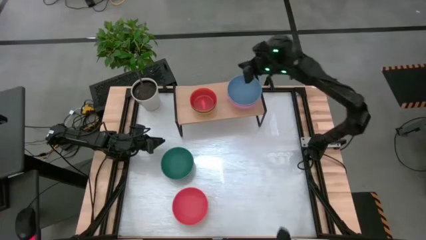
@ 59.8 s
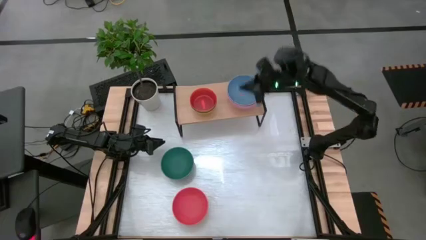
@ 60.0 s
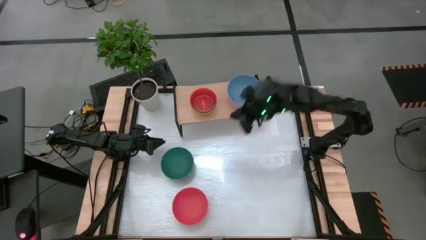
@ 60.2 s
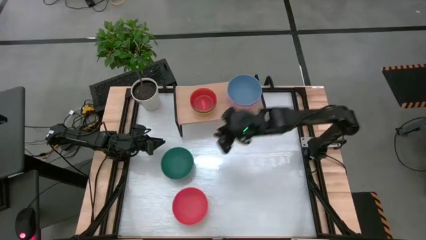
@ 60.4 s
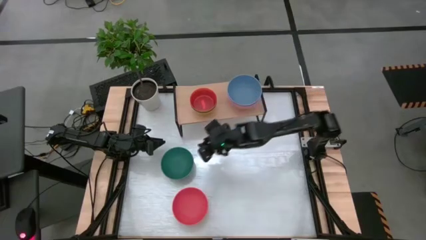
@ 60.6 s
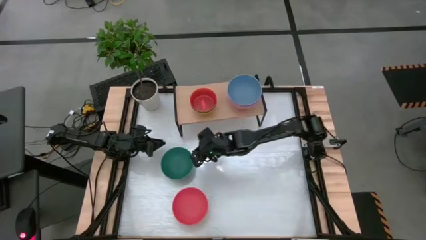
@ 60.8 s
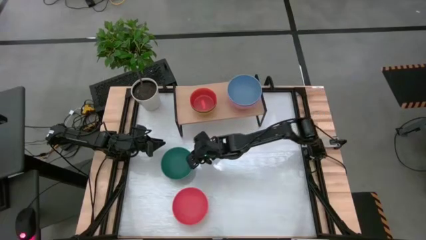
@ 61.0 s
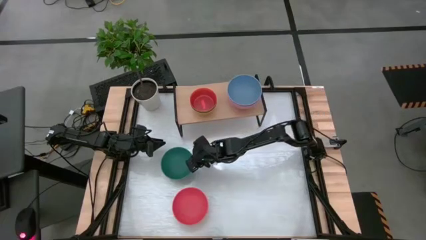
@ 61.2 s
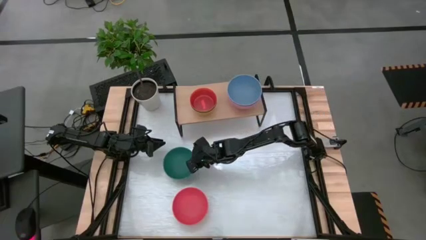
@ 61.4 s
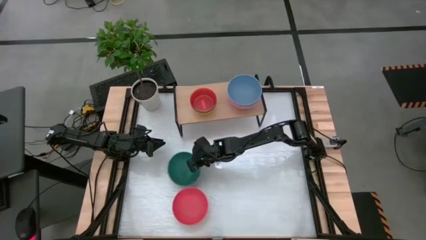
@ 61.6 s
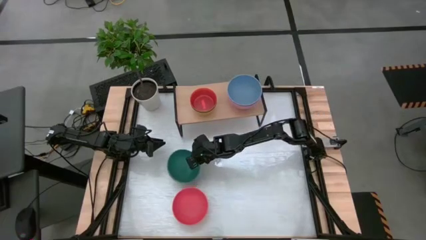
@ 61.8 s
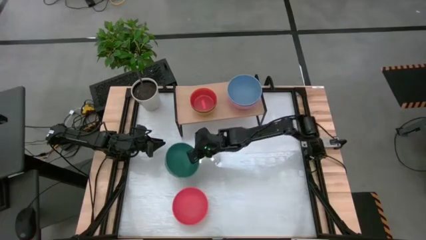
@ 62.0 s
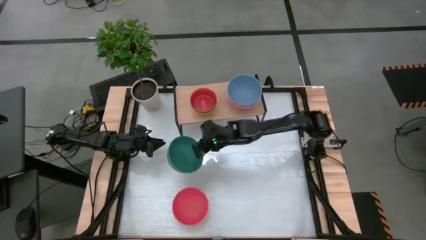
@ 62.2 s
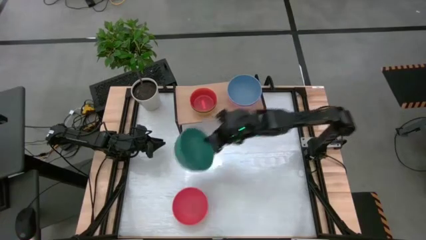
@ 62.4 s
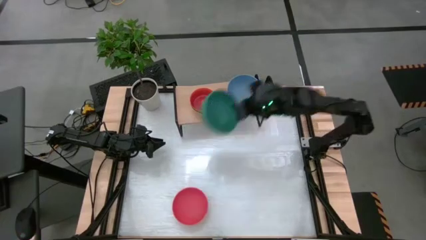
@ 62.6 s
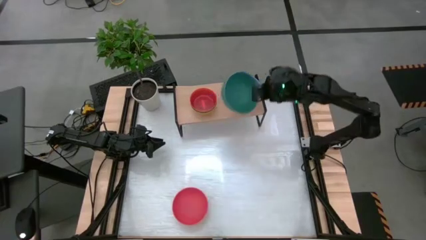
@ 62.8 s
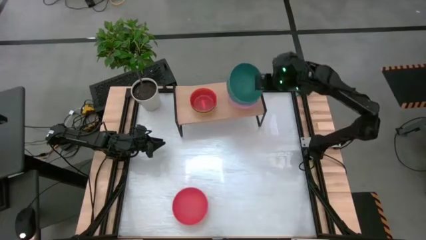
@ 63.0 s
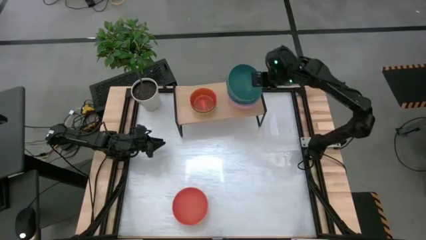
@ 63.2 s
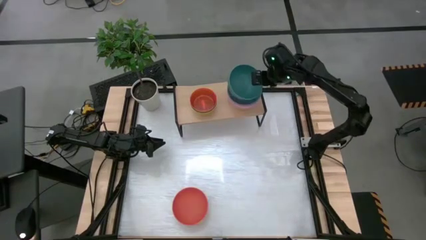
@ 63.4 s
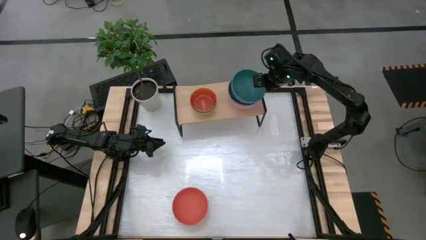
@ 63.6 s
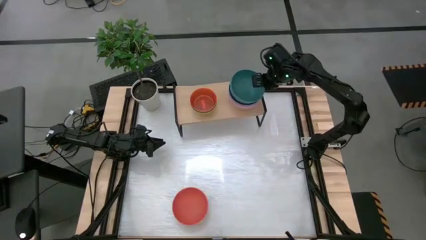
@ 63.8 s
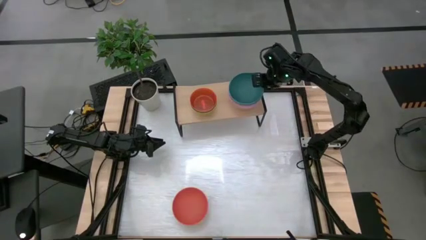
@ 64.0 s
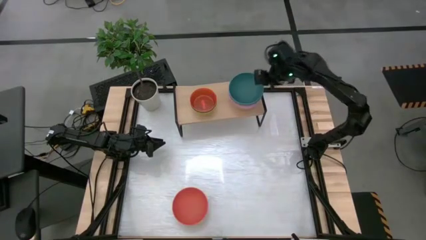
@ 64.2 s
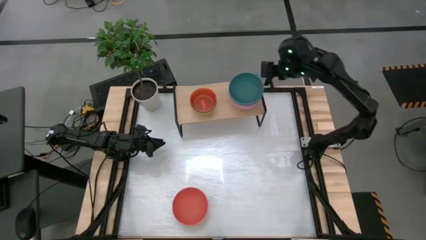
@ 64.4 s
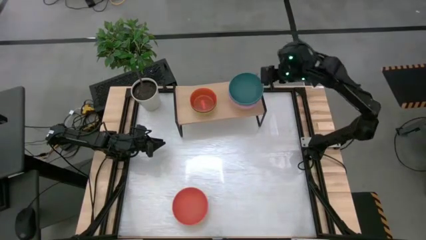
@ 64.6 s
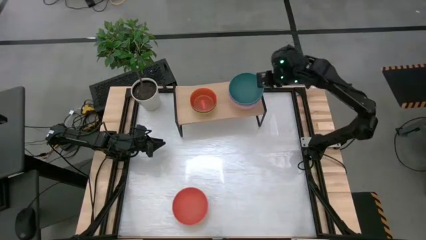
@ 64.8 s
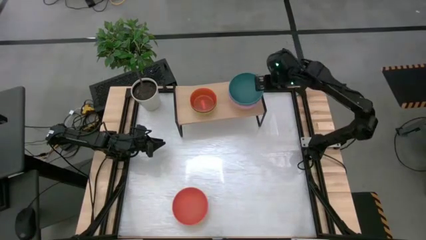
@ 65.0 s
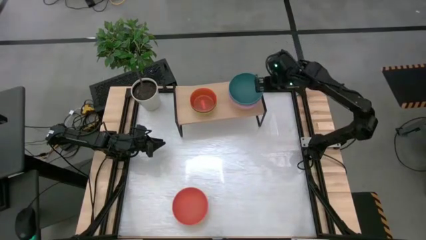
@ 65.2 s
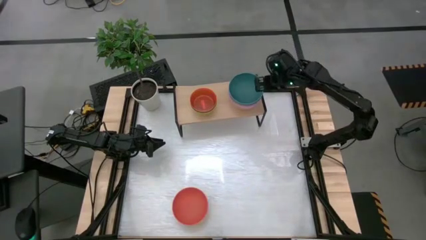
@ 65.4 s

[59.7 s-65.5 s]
Task: Place and stack bowls onto a shelf
Stack the dark green bowl on top of the blue bowl on the shelf

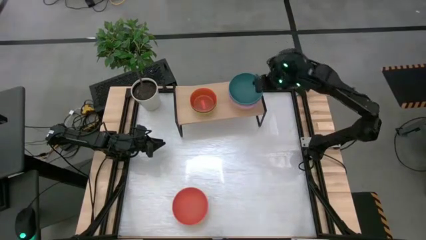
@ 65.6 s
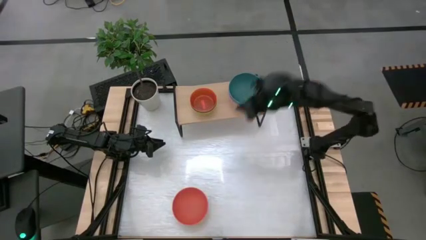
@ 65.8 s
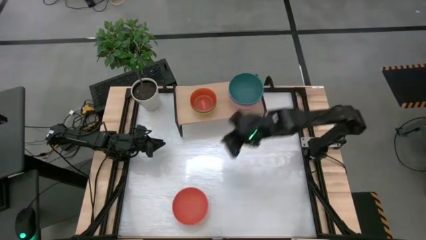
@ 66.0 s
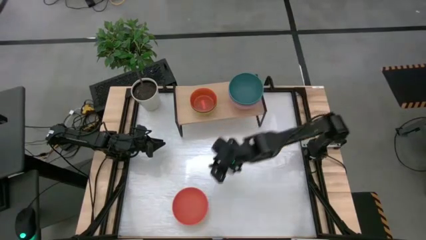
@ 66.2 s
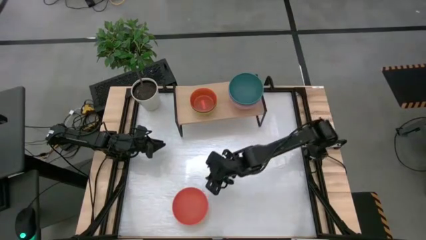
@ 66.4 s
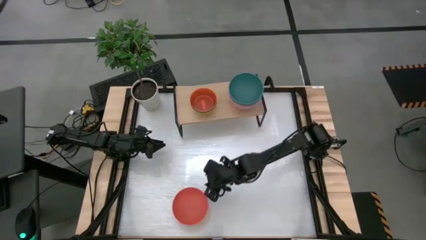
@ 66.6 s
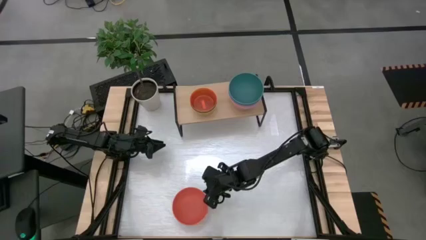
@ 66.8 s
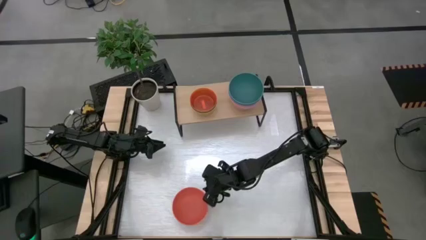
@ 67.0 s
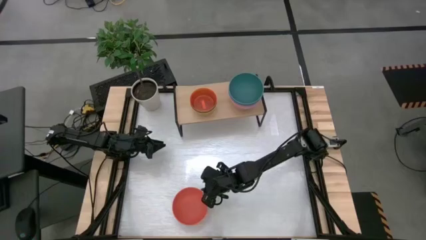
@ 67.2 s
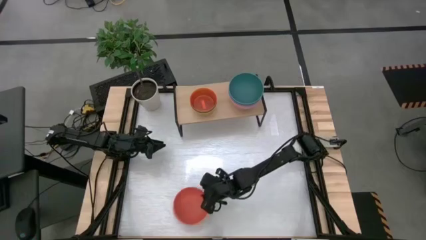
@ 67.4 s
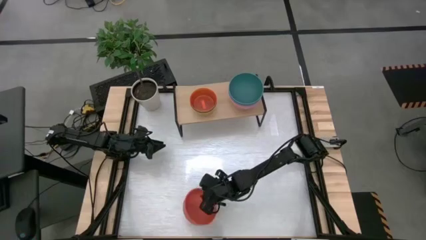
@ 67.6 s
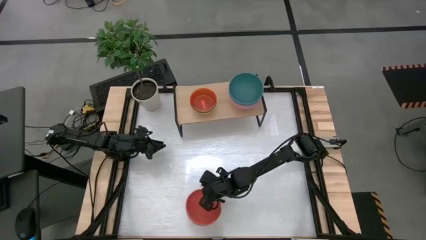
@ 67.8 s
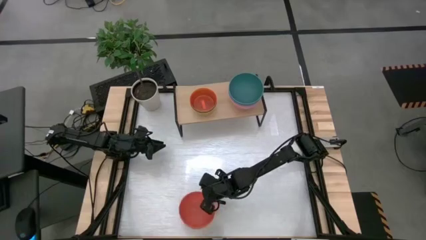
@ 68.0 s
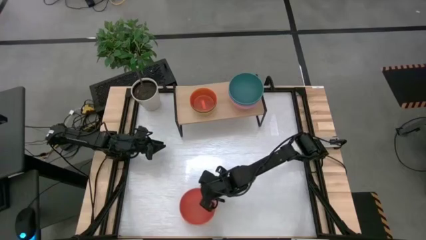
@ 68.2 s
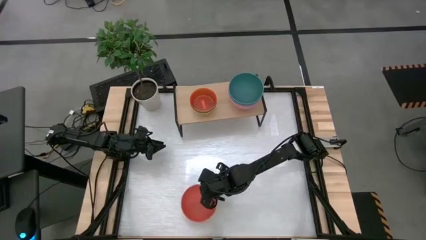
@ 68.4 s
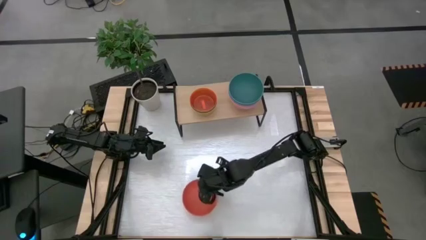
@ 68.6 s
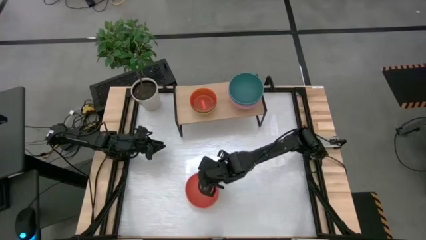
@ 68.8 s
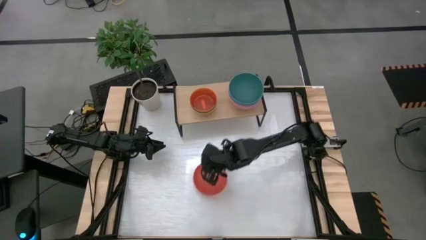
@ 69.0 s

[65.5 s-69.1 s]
Stack the orange bowl on top of the dark green bowl on the shelf

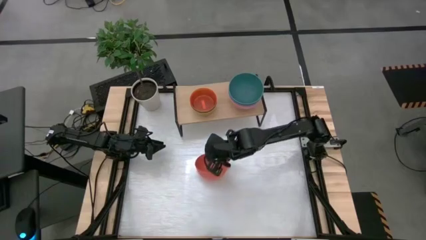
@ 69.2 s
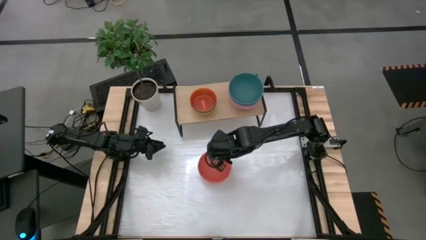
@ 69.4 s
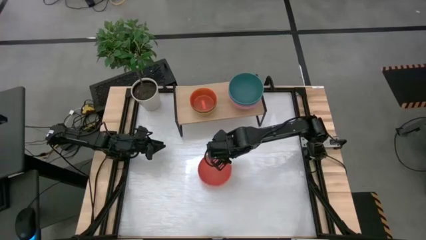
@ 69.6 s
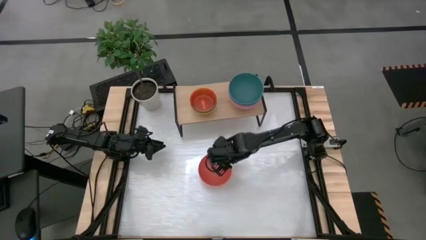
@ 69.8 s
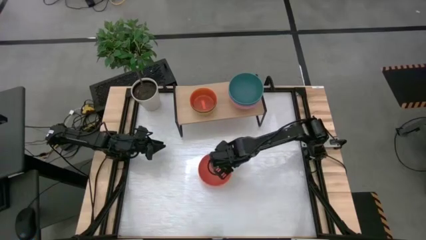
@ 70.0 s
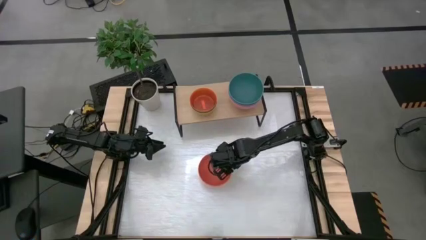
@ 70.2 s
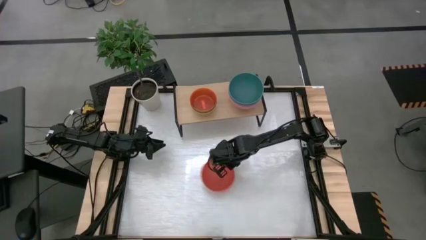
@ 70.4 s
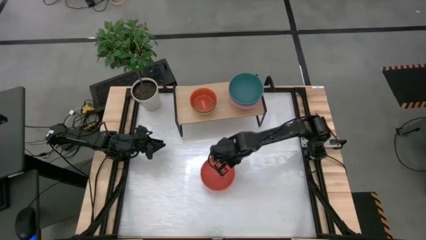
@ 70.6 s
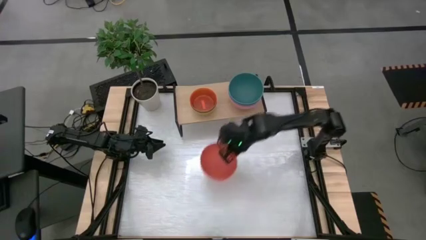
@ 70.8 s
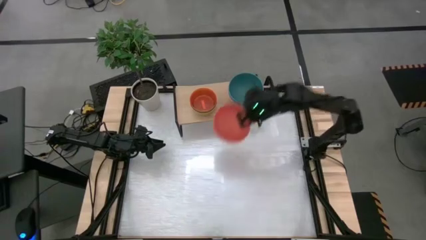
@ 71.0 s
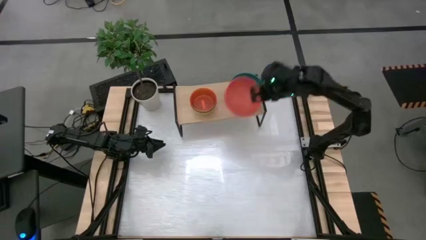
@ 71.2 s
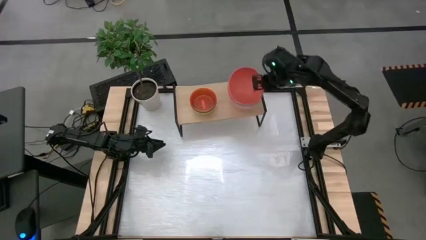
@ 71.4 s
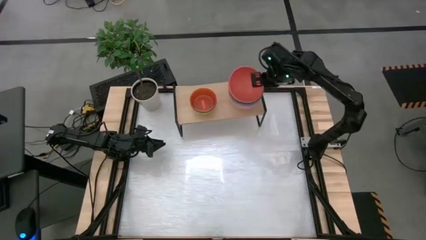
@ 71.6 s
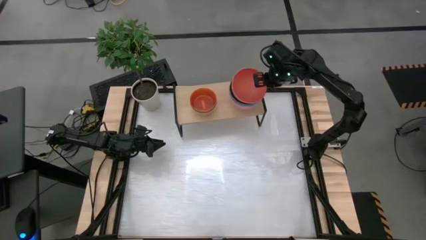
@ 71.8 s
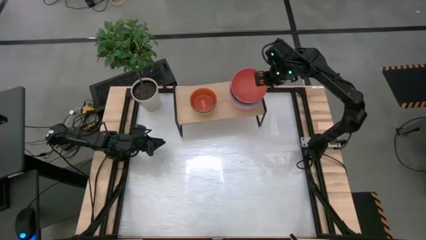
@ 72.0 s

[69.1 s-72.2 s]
Stack the orange bowl on top of the dark green bowl on the shelf

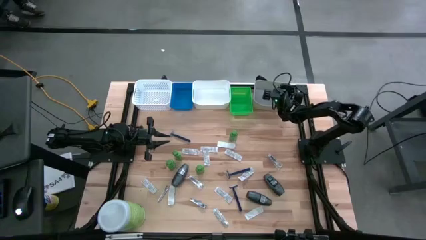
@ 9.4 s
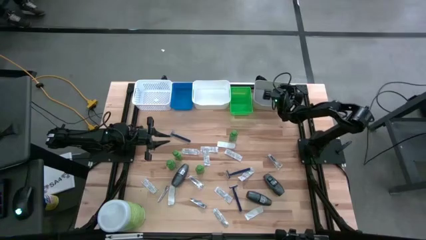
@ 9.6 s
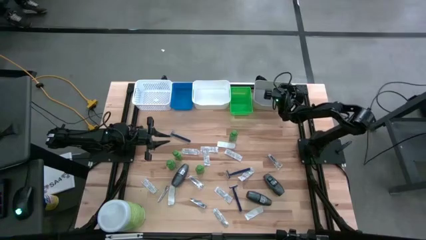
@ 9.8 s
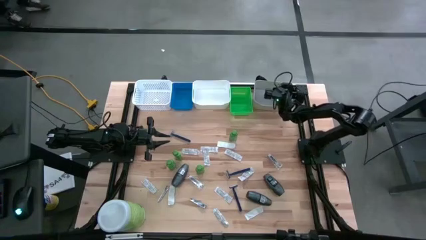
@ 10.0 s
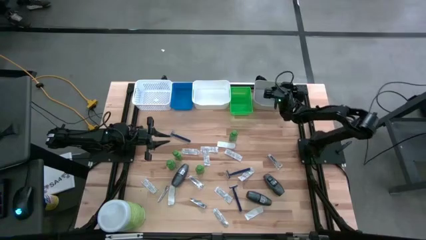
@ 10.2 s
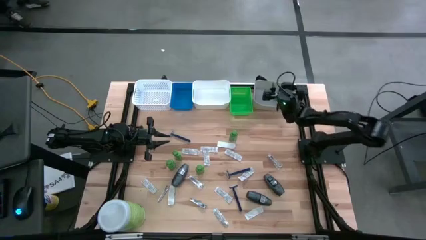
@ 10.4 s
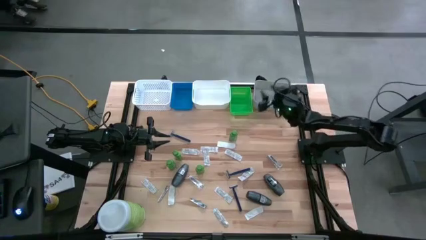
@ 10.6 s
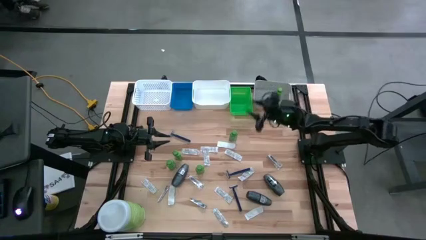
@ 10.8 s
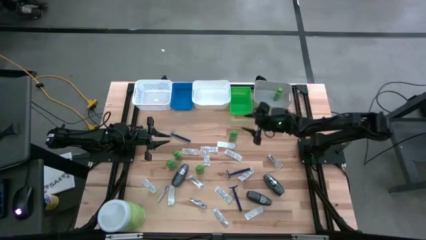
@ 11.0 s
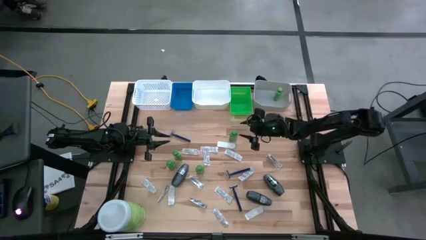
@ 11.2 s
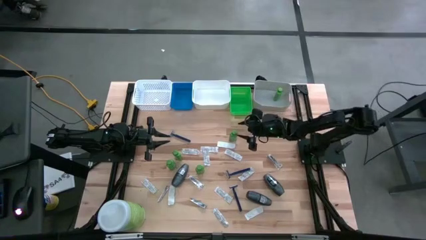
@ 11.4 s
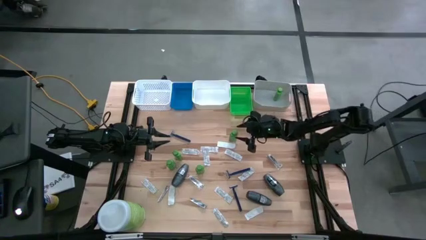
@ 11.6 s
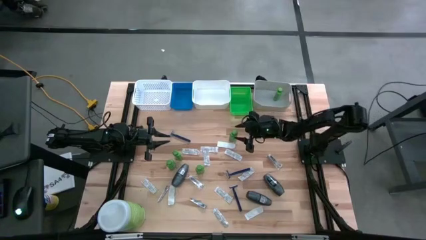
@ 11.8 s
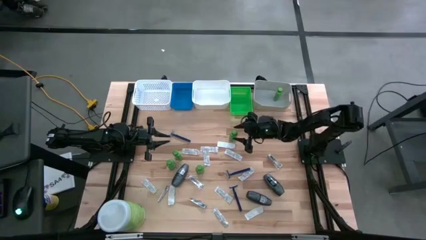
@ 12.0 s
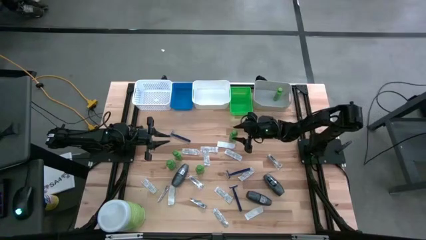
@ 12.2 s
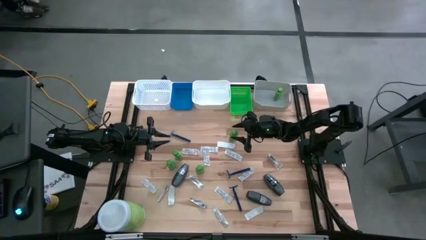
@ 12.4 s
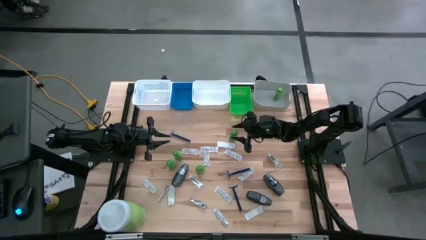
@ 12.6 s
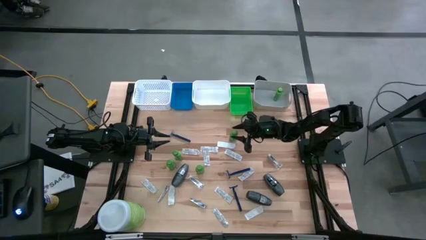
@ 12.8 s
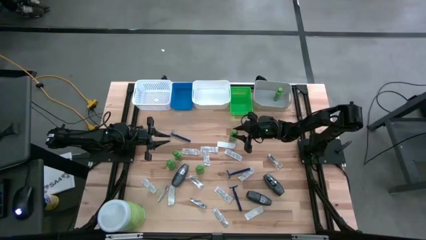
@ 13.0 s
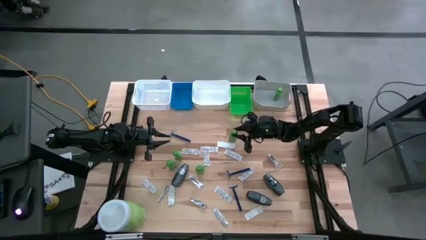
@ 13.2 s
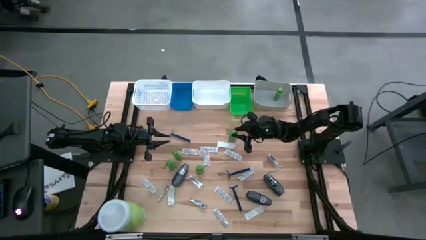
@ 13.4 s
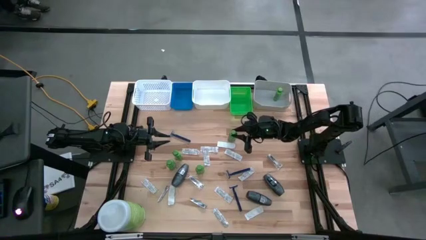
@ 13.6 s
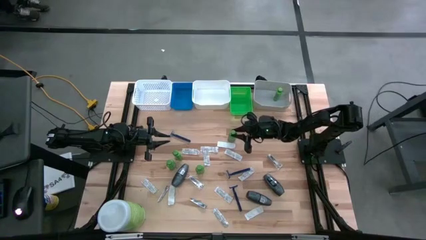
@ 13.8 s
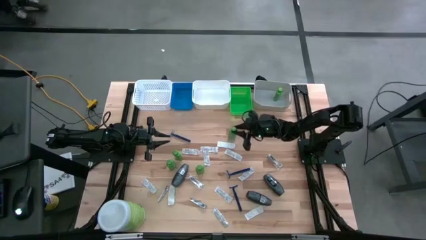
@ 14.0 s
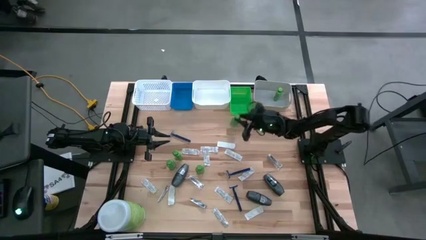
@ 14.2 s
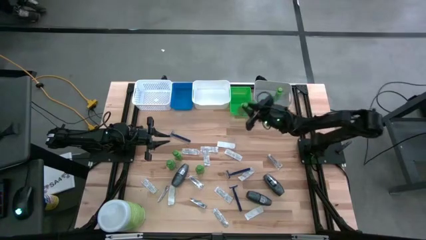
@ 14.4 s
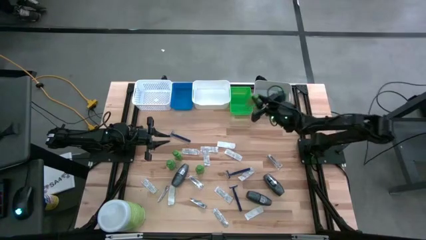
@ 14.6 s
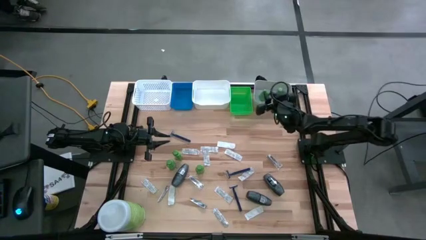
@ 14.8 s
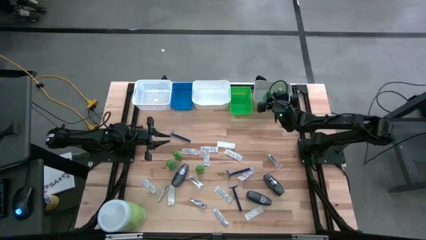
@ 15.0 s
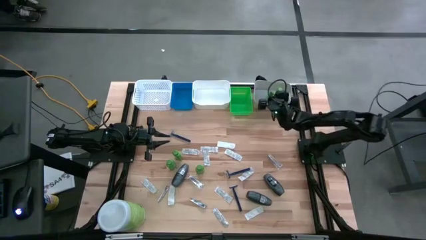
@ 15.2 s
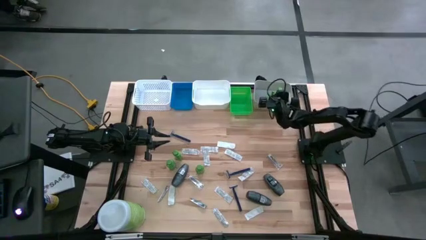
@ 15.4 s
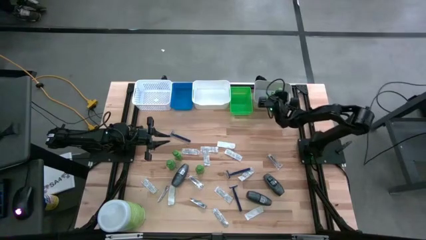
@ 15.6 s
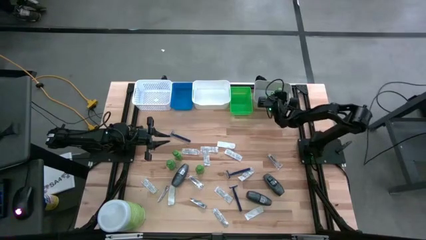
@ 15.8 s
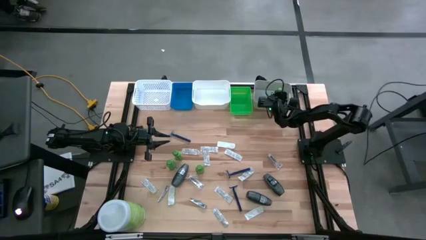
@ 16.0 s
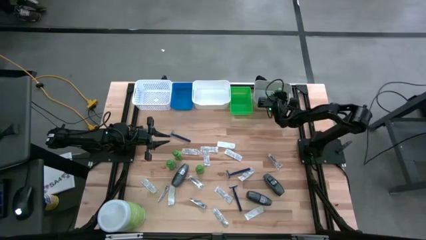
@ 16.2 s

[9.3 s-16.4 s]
Task: Pick & Place Travel size toiletries
Put the shampoo into the gray bin
